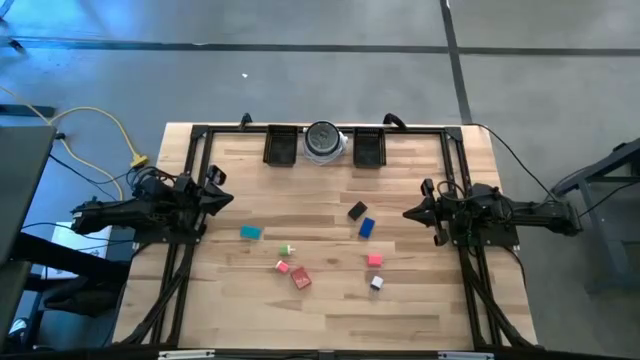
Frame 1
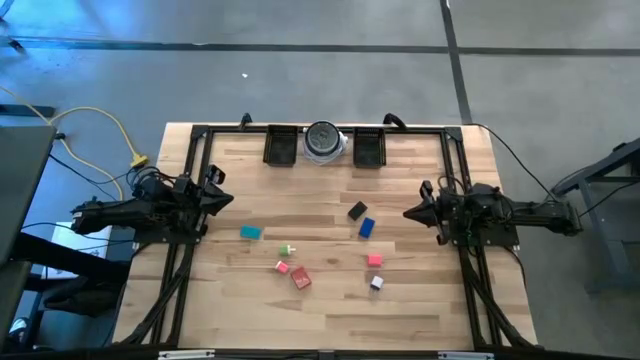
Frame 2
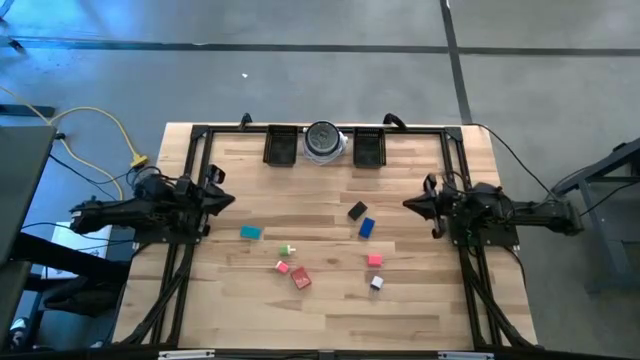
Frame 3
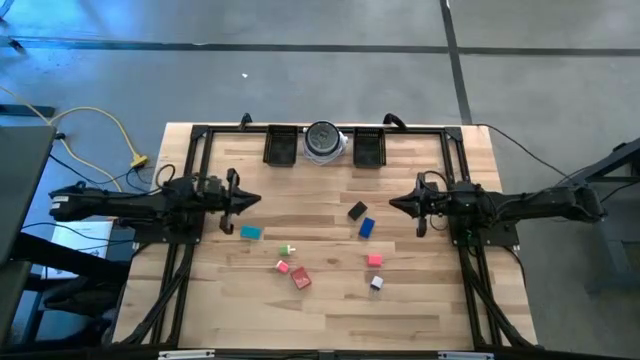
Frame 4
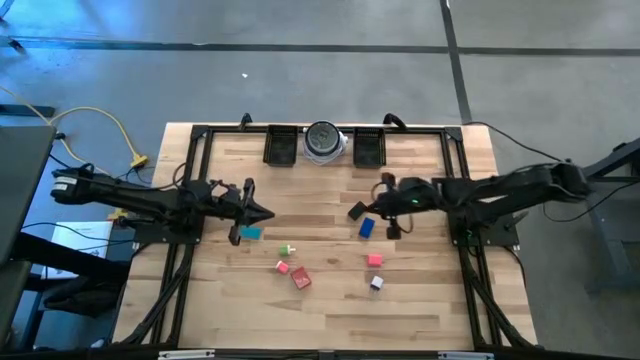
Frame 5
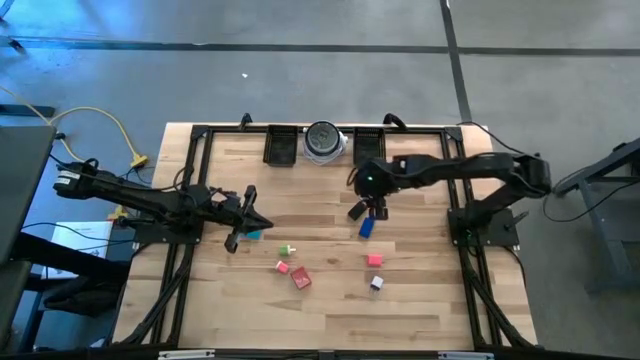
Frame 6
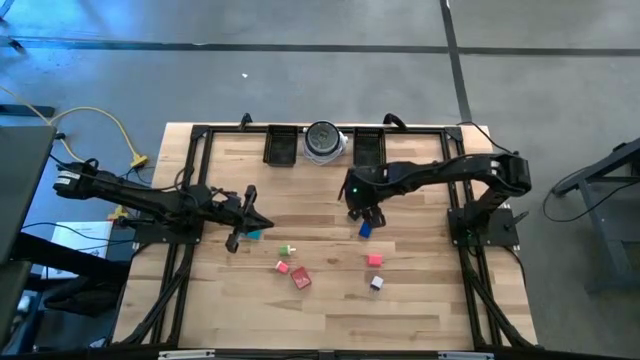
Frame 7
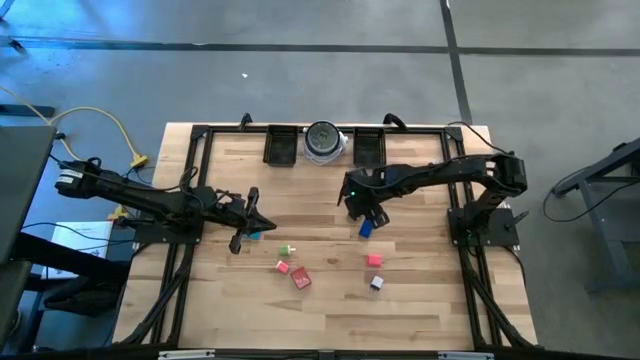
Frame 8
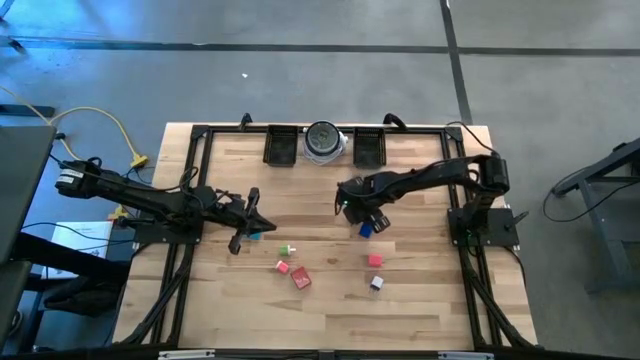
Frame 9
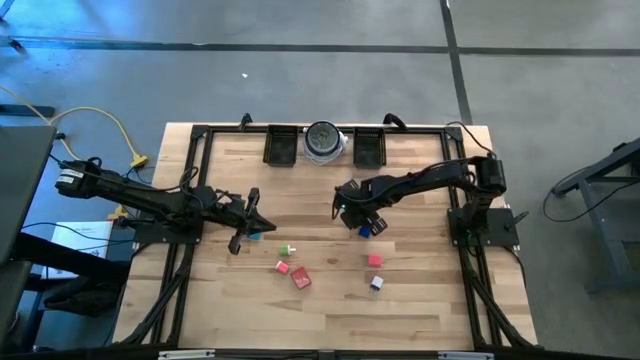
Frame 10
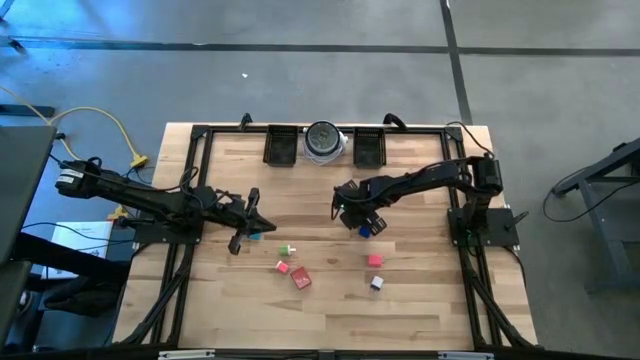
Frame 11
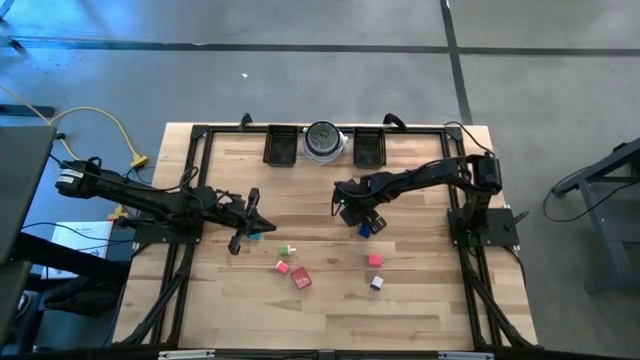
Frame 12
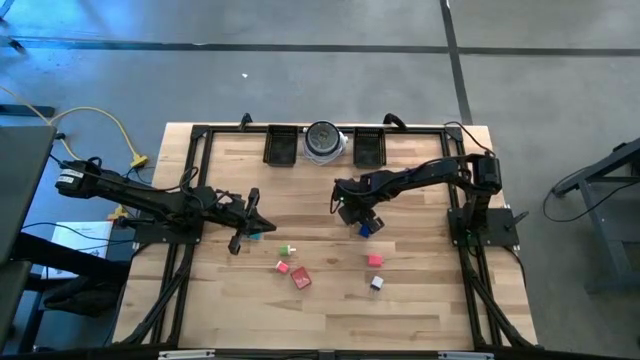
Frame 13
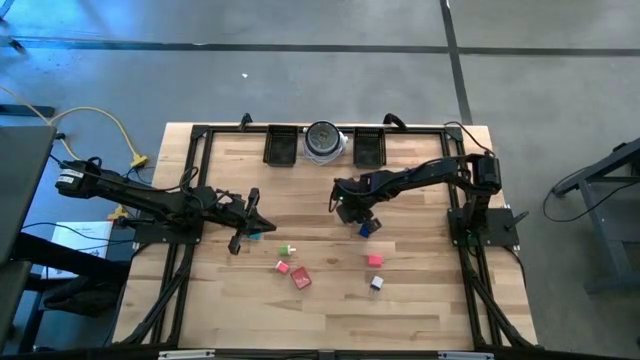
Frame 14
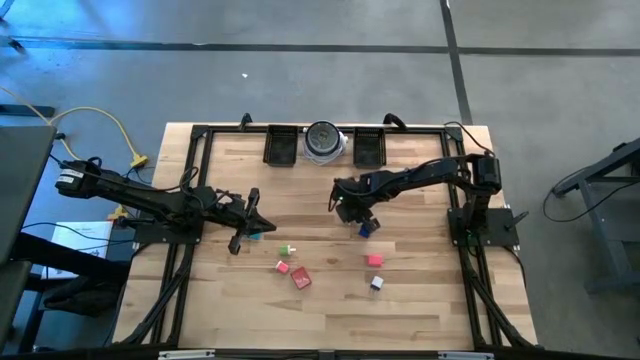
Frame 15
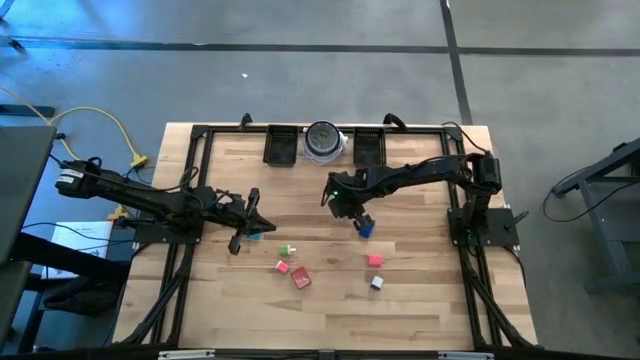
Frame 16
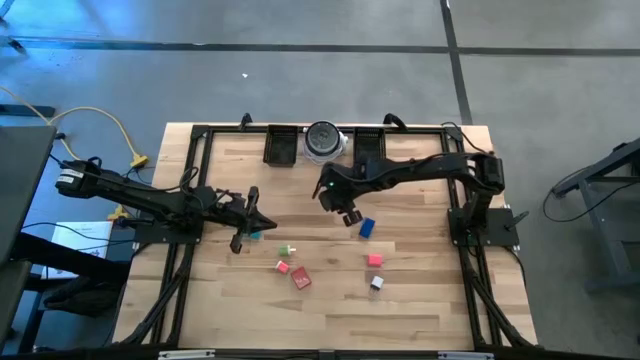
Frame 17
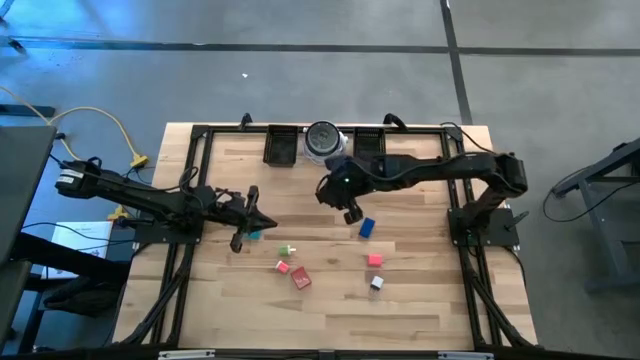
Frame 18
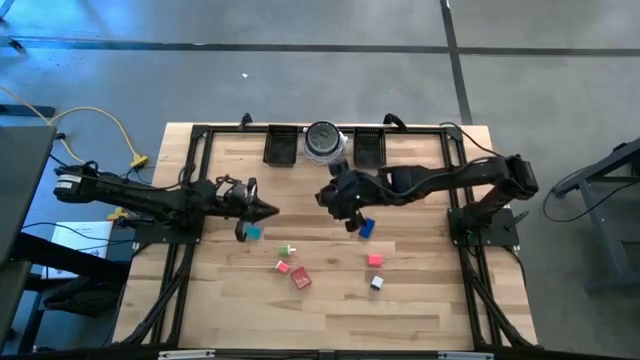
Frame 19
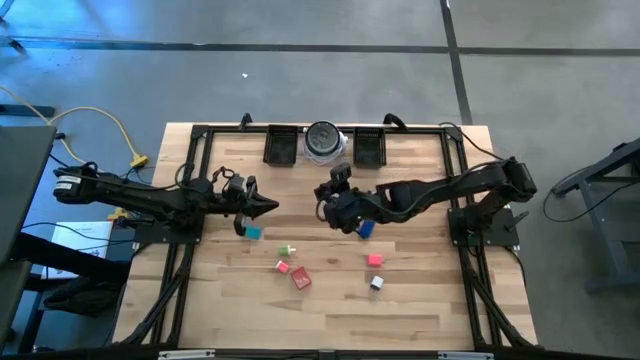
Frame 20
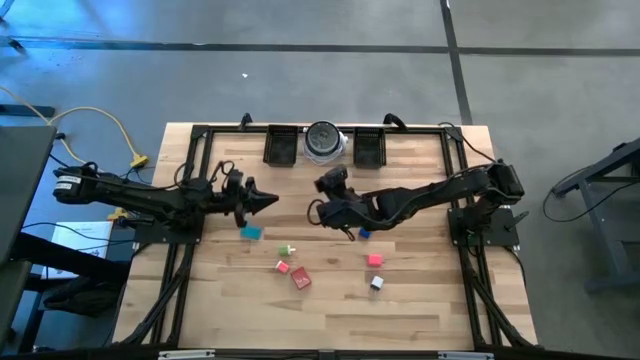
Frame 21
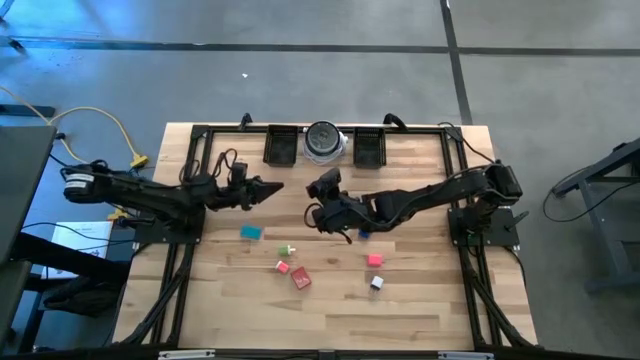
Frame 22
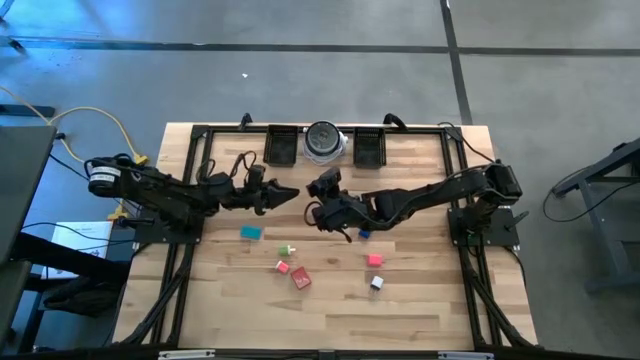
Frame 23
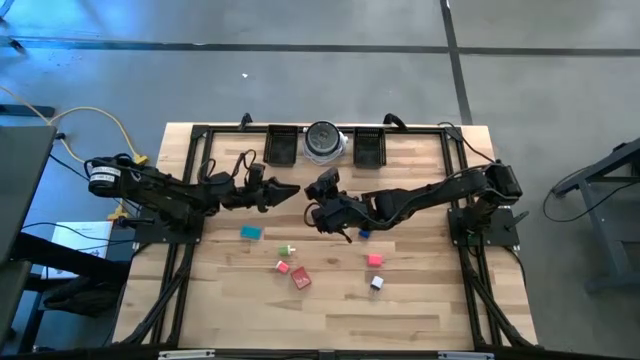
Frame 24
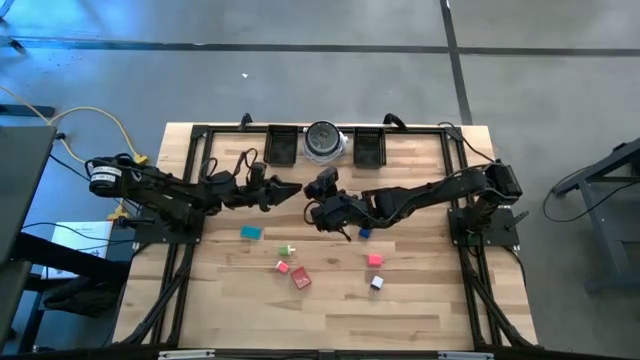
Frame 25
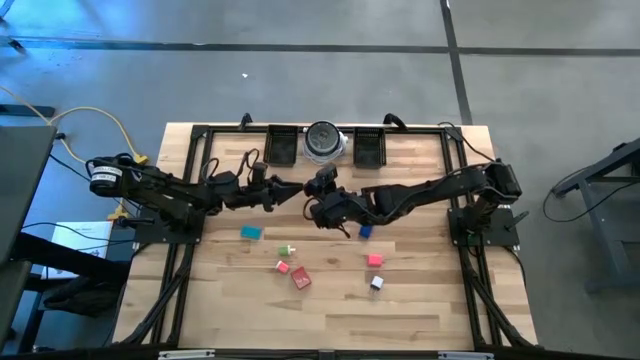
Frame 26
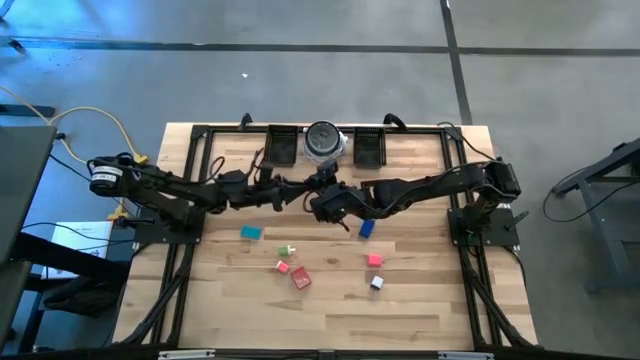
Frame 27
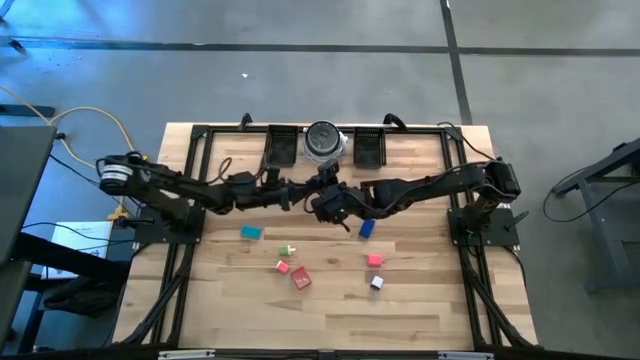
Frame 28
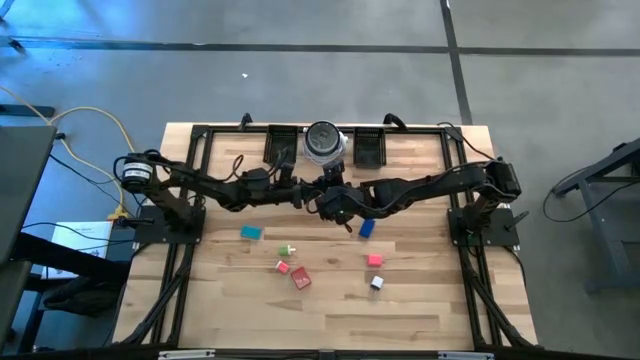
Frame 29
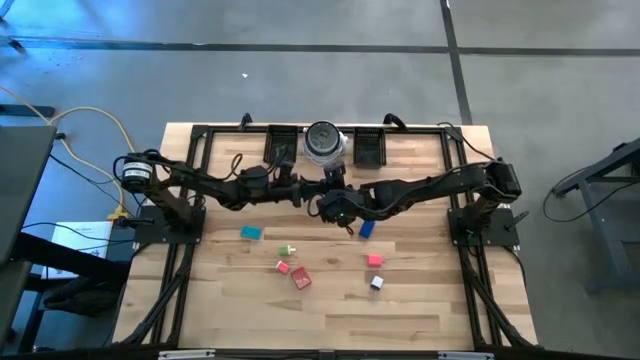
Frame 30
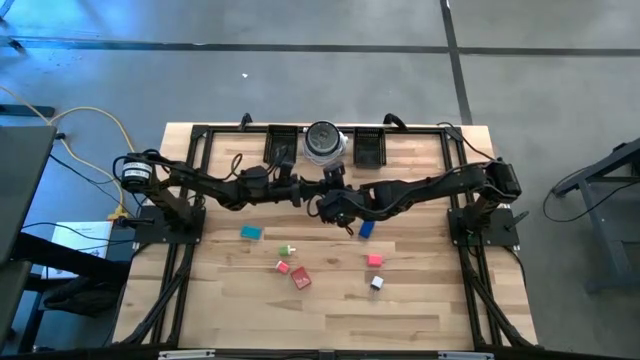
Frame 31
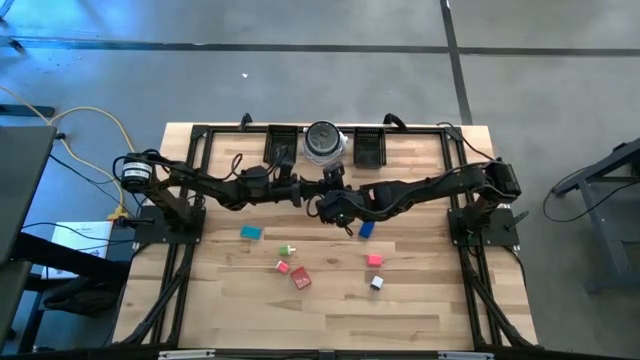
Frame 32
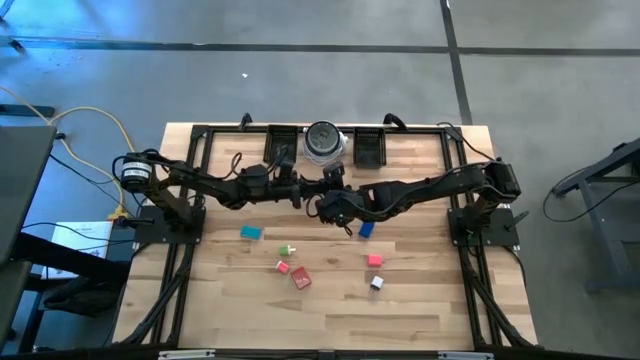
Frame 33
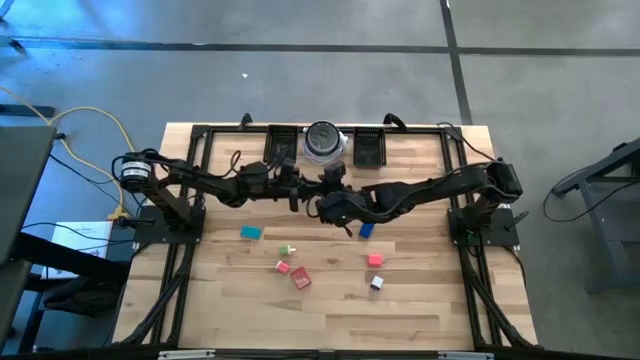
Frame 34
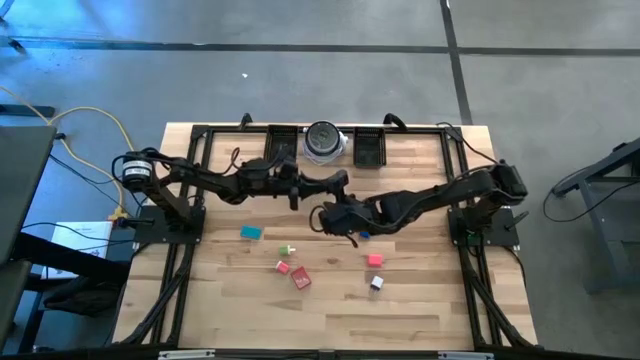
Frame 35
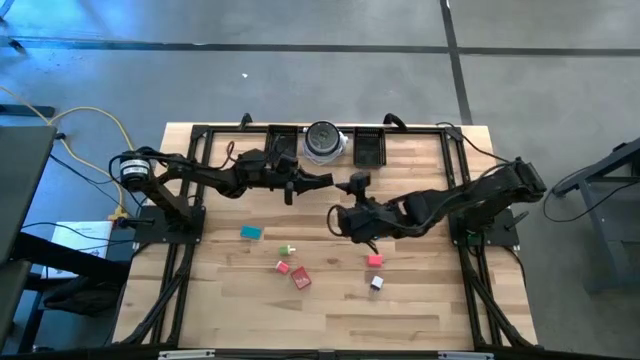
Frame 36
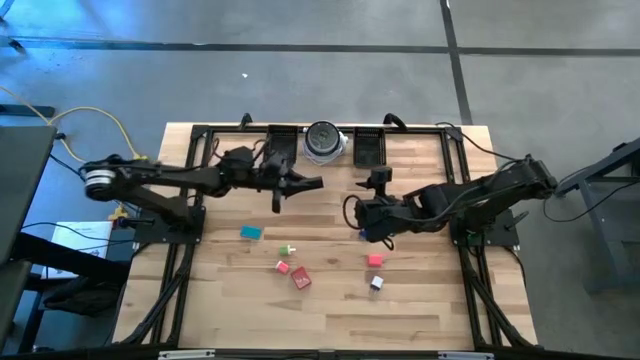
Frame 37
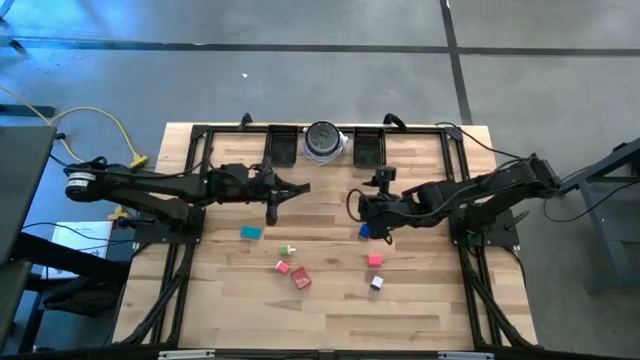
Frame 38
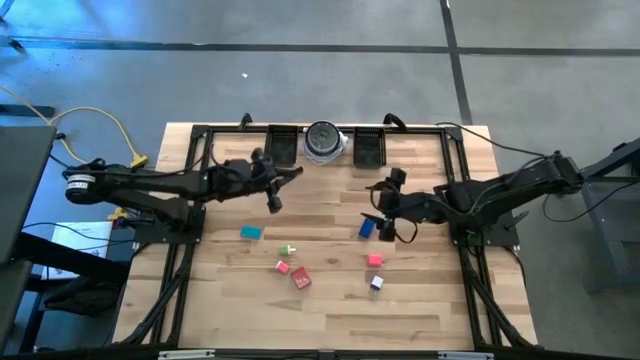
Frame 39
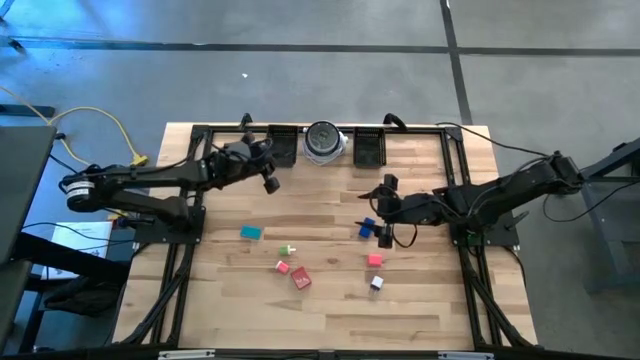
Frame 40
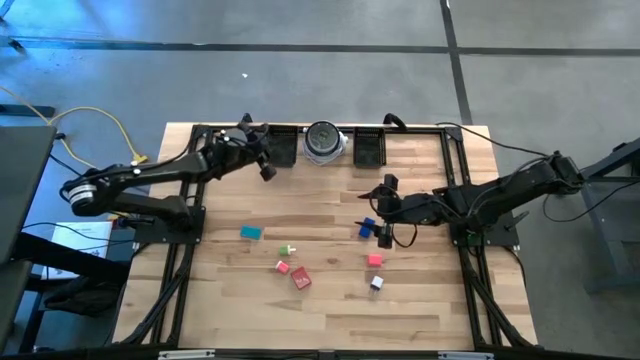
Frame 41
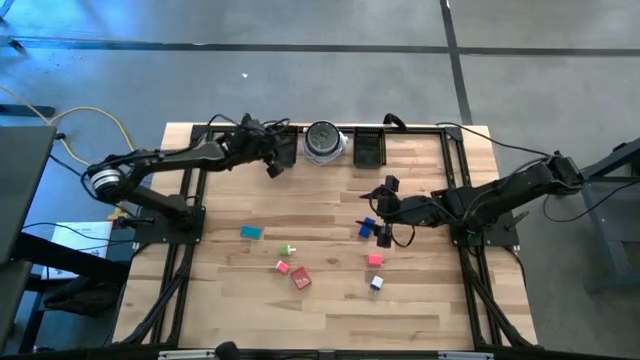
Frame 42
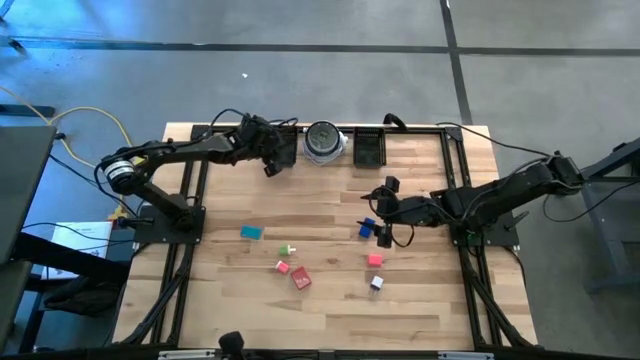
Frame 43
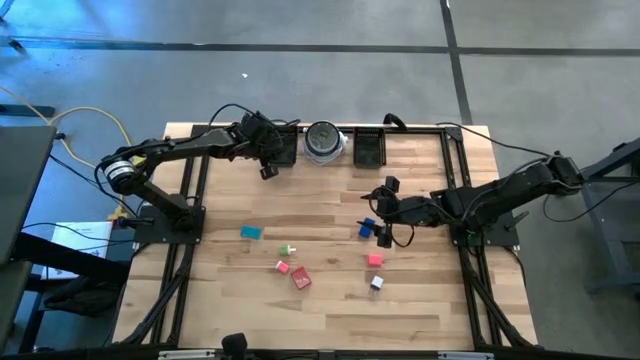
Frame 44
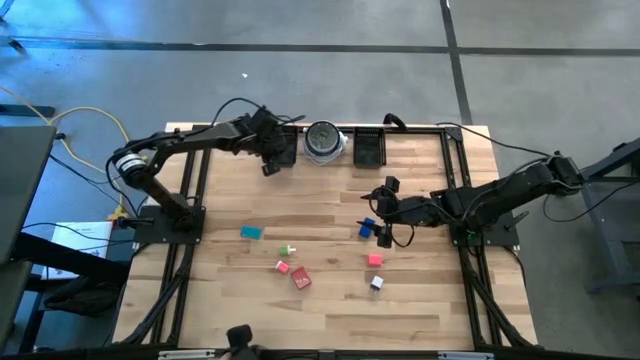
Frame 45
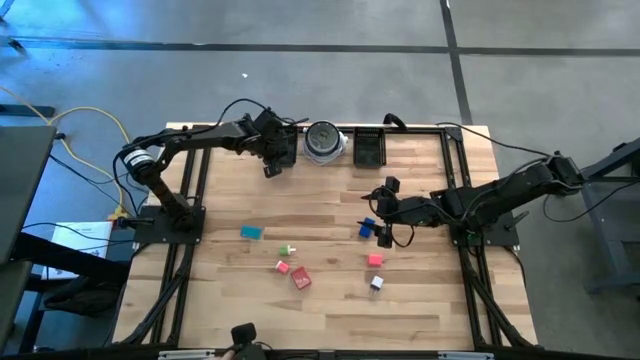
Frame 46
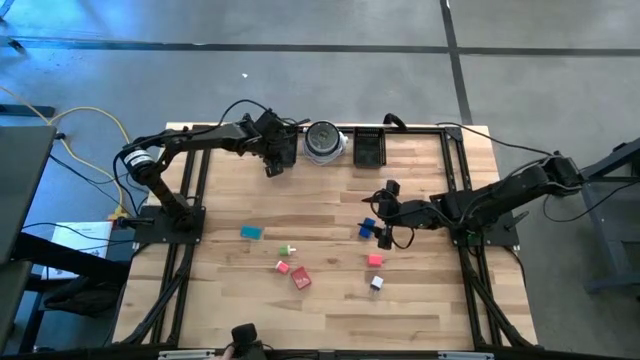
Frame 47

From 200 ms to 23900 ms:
Task: Pick & Place Office items
Put the black timer into the left black basket
